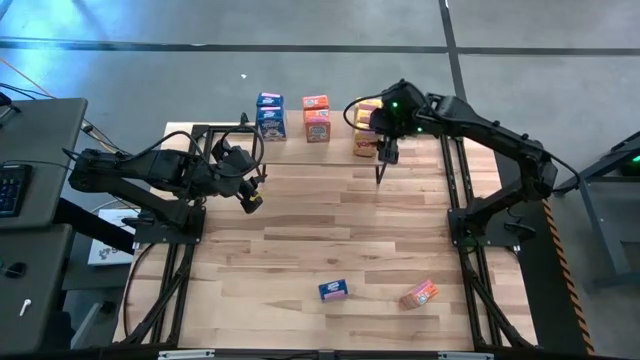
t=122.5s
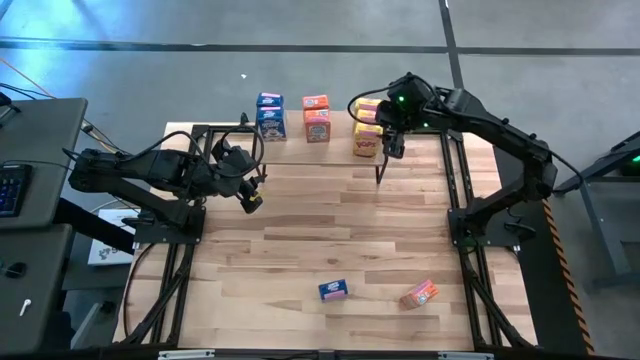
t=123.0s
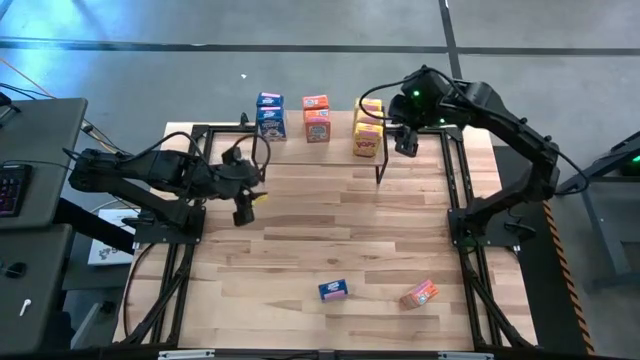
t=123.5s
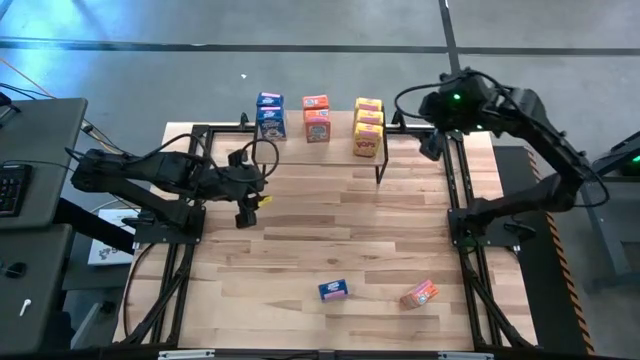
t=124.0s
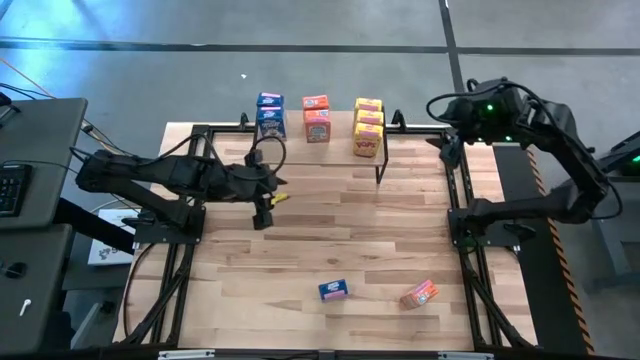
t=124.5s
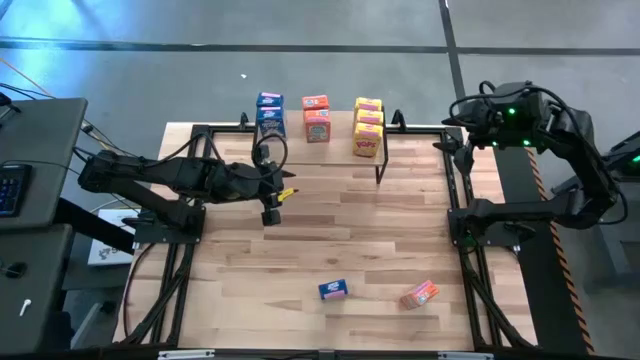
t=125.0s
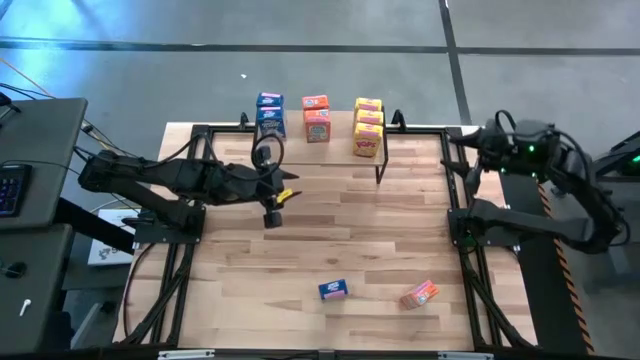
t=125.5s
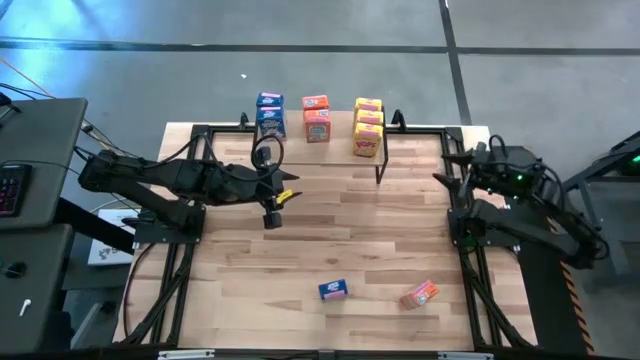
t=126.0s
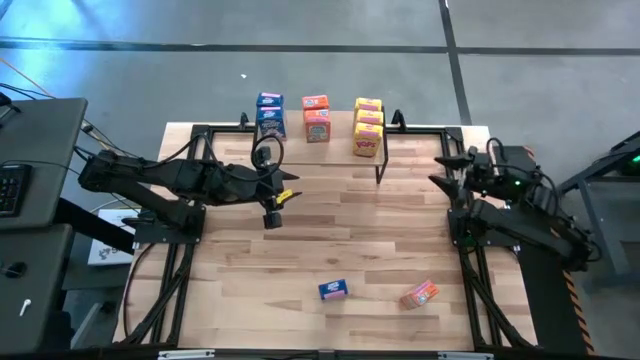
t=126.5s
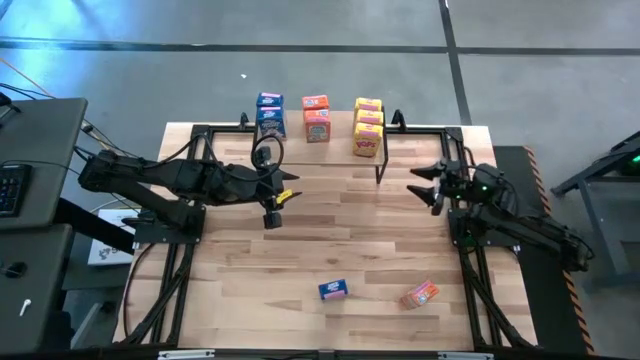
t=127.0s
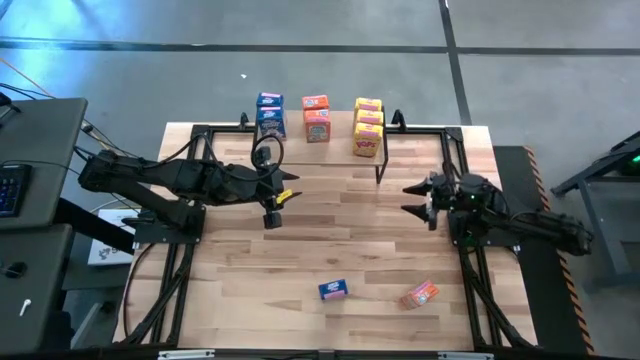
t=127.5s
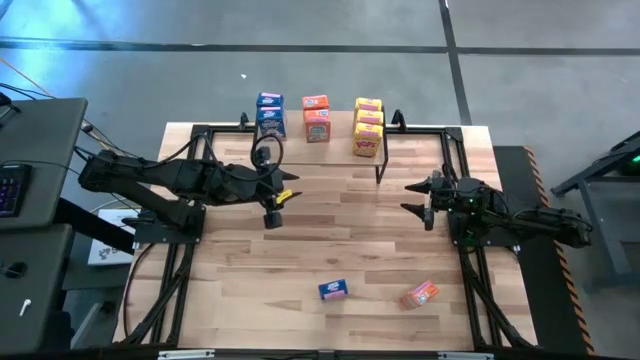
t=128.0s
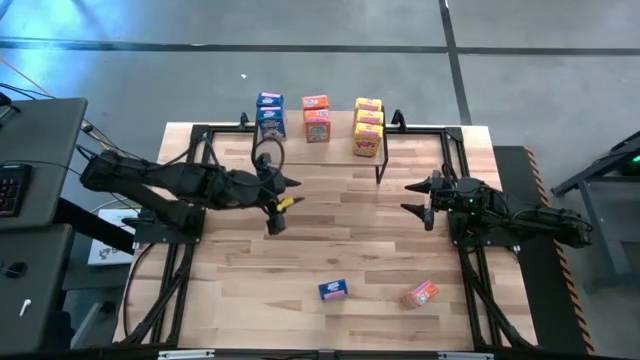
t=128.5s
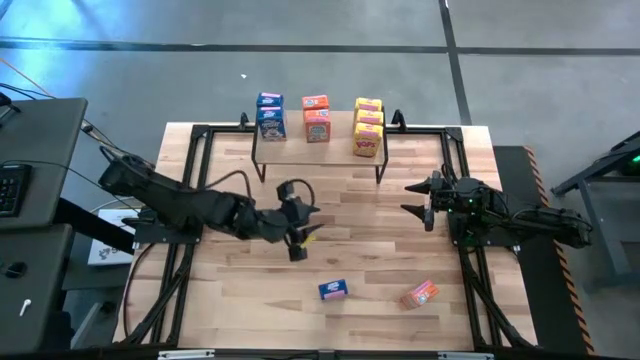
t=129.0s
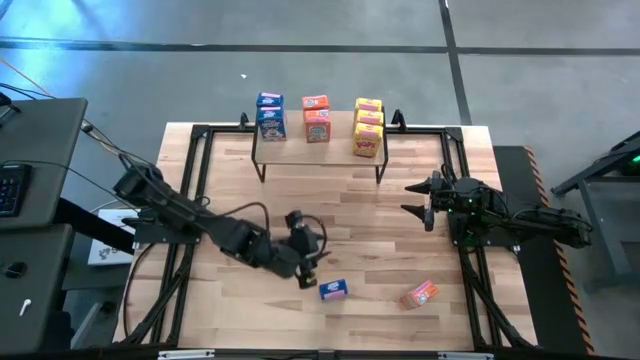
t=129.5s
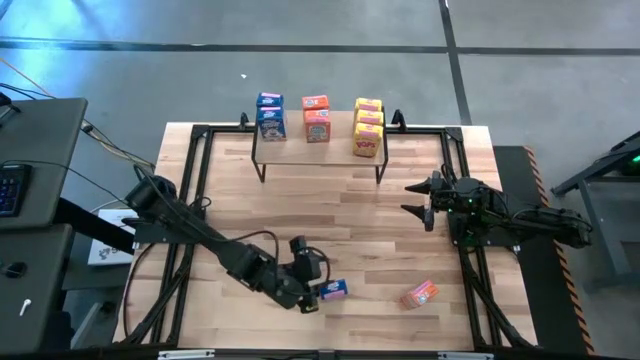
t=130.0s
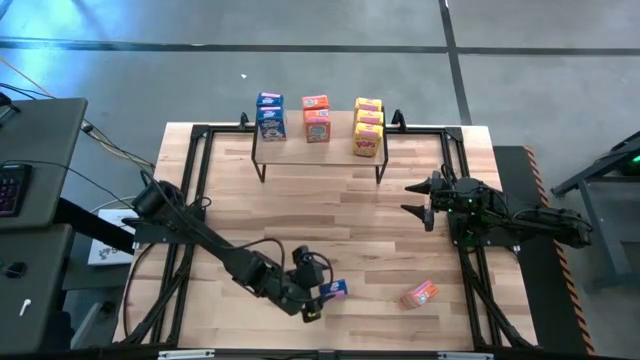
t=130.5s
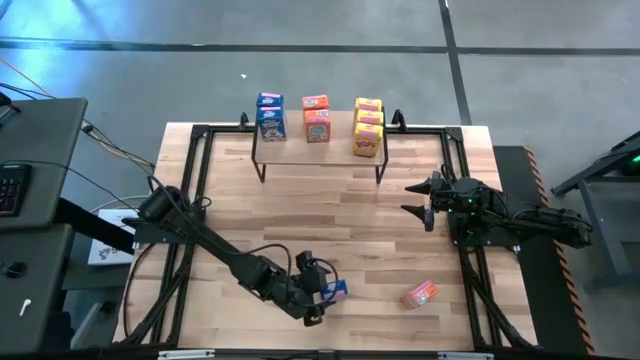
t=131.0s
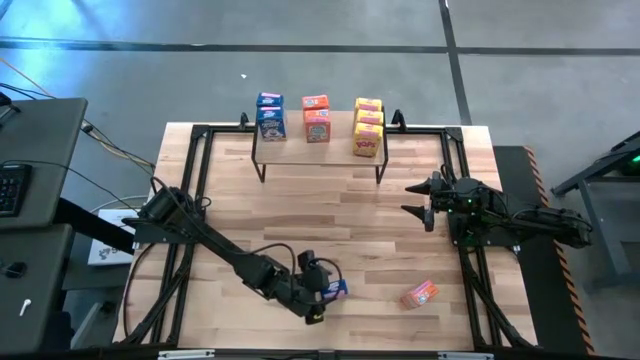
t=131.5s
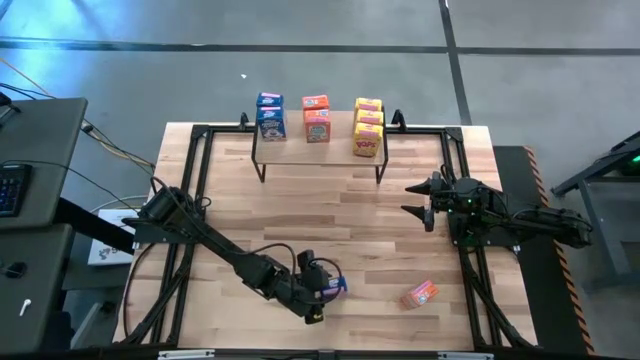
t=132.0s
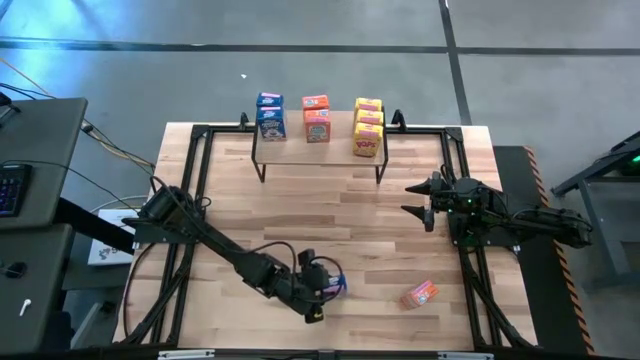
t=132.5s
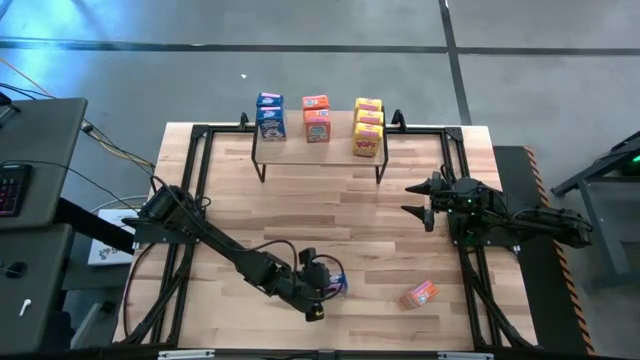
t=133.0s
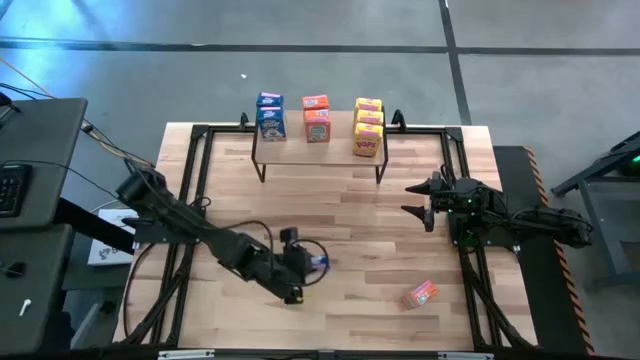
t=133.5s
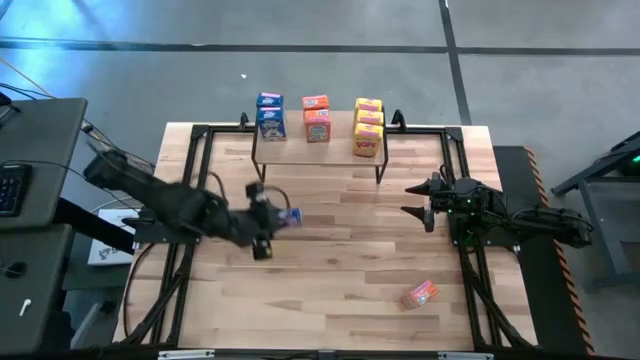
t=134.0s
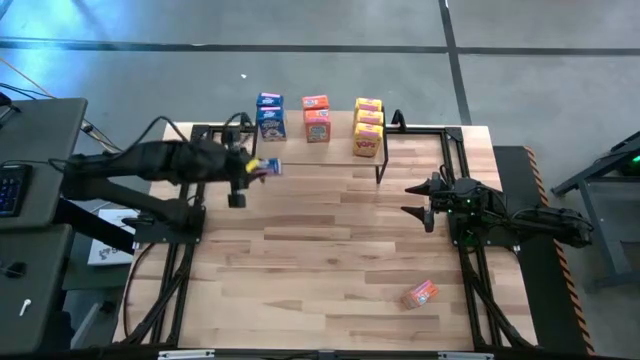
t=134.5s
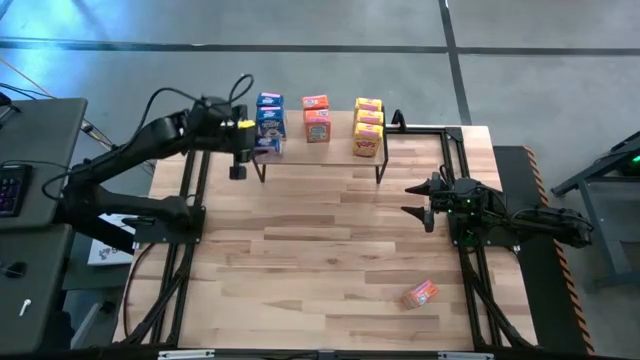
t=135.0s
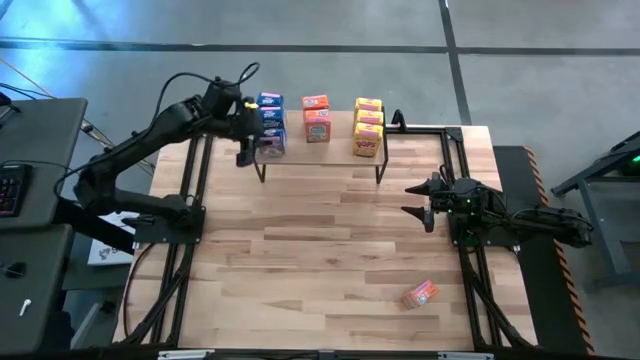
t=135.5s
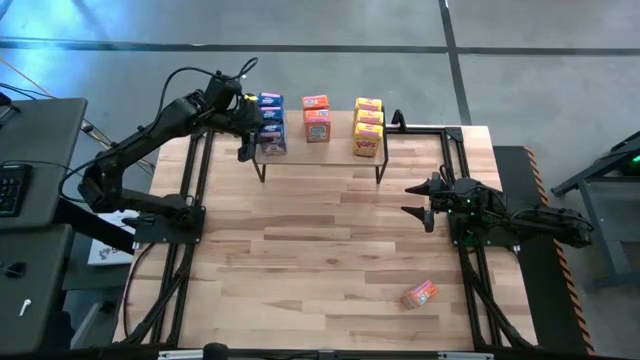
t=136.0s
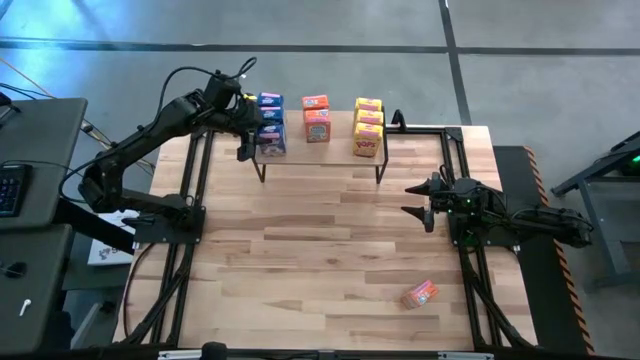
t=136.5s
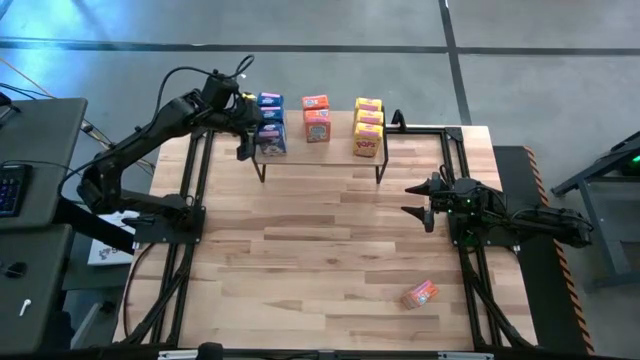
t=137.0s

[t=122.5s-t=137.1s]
Task: Stack cereal on shelf
Put the blue cereal box on the shelf aligned with the other blue cereal boxes
